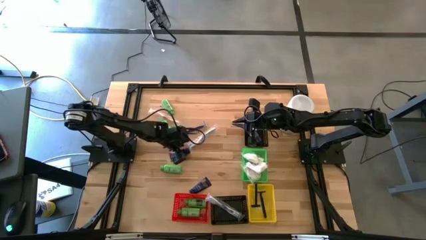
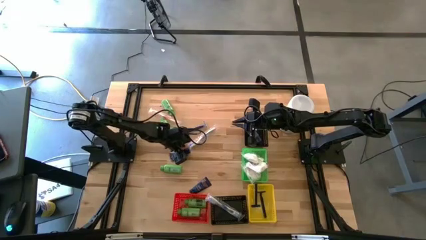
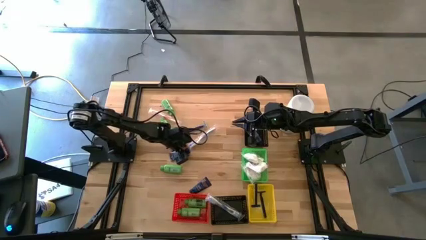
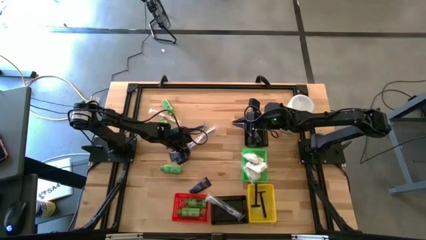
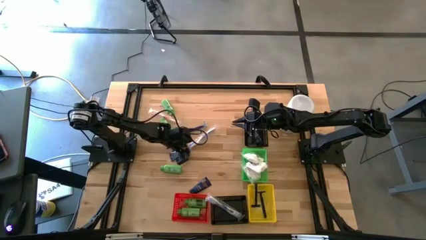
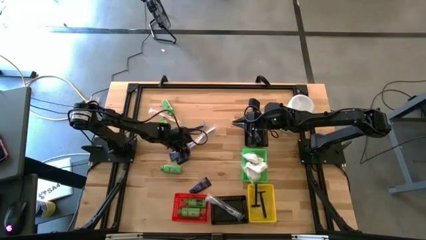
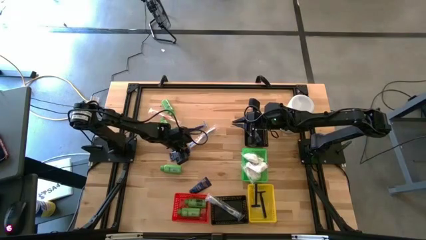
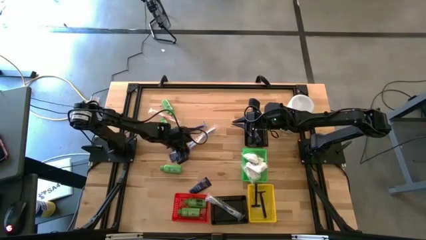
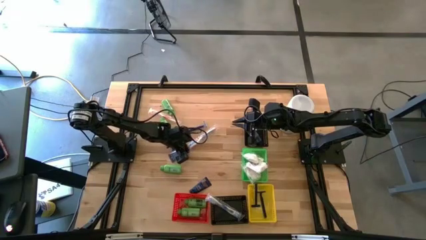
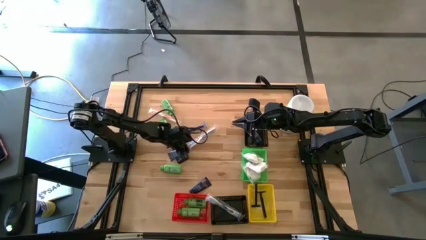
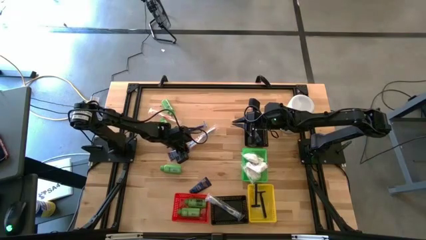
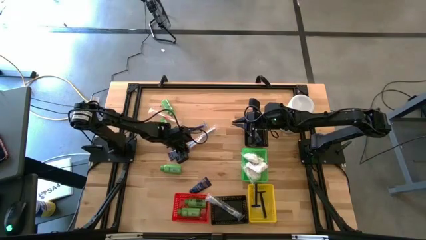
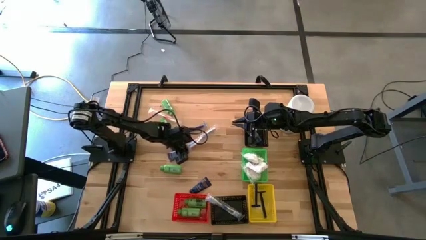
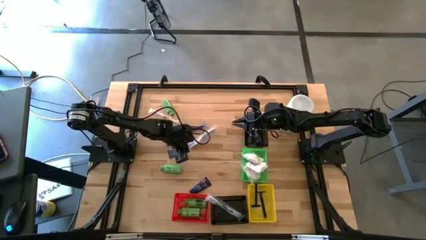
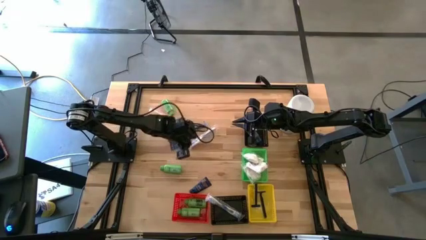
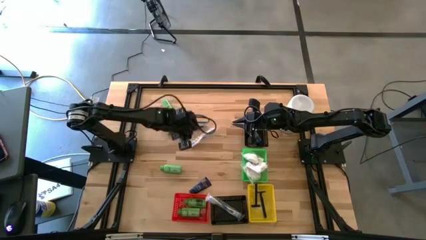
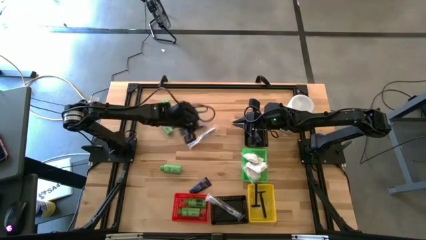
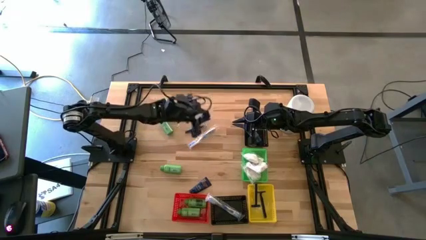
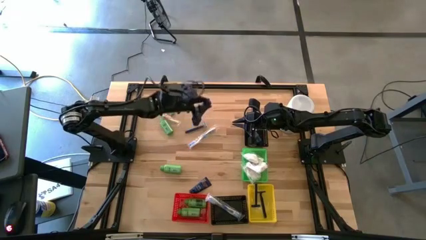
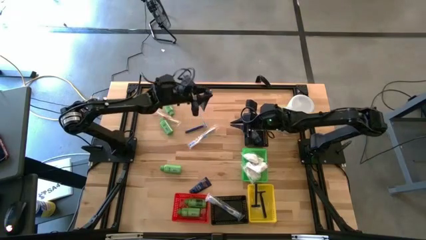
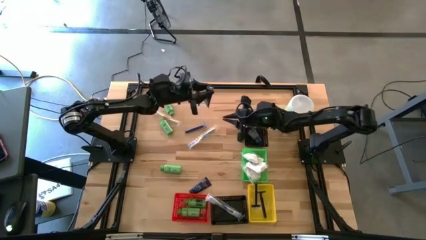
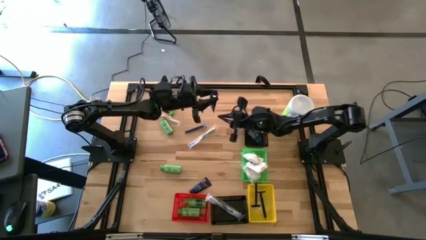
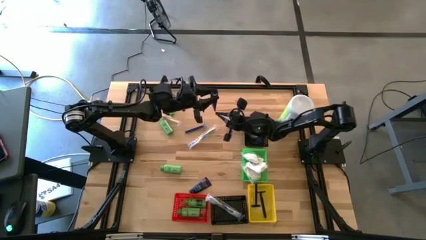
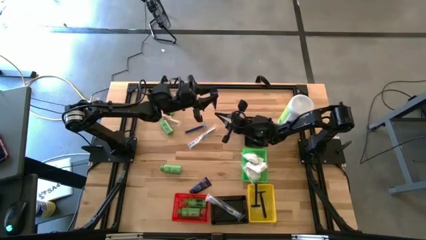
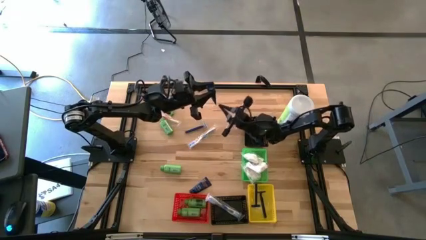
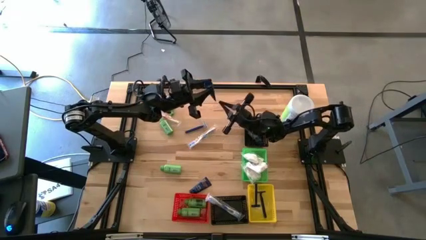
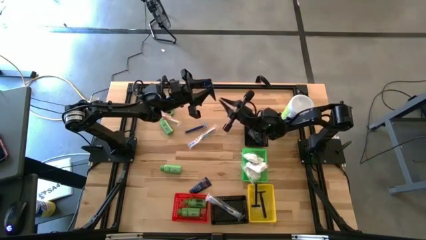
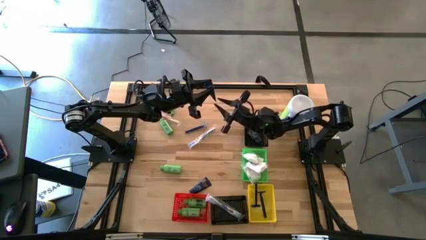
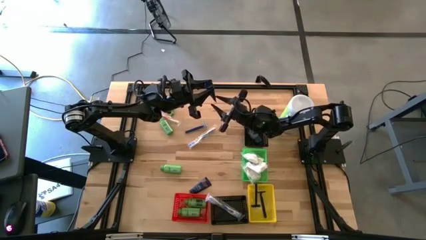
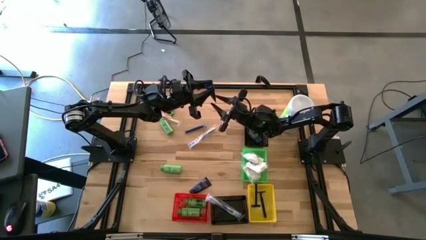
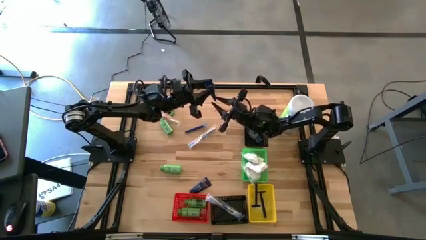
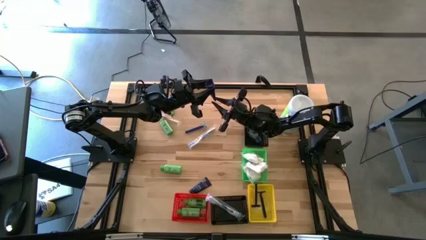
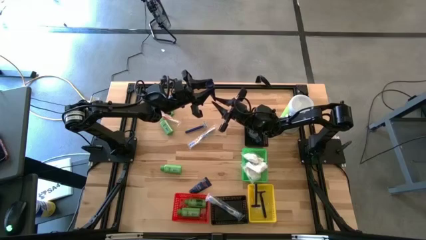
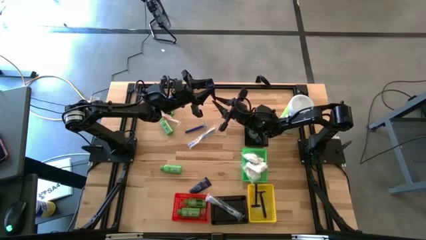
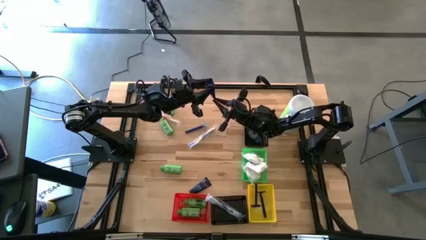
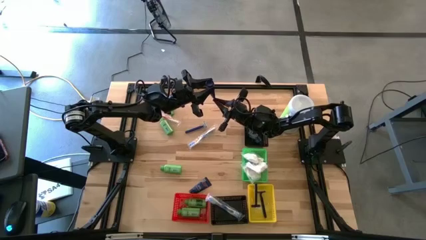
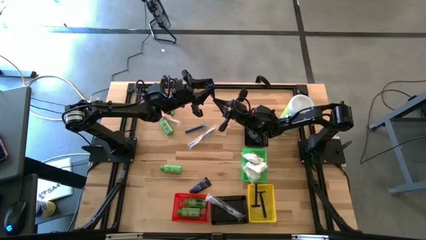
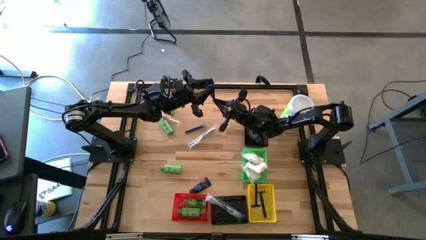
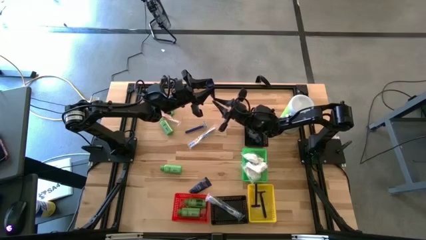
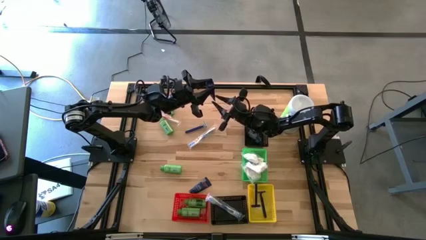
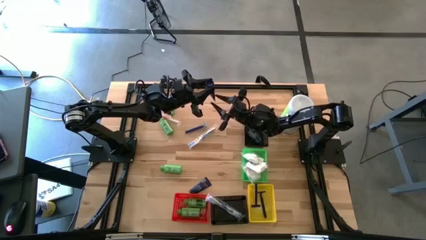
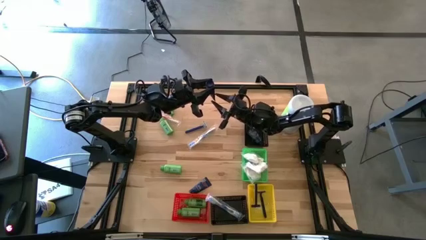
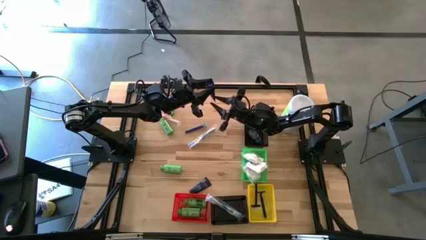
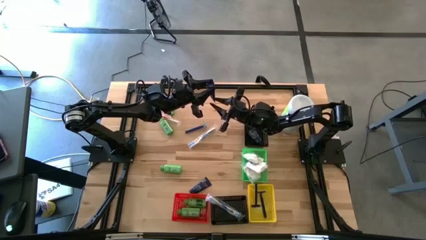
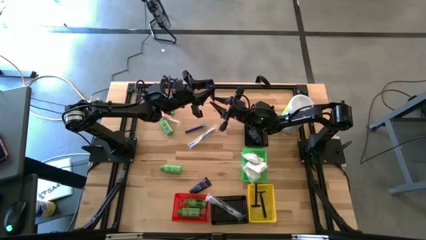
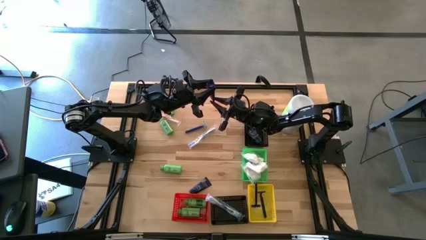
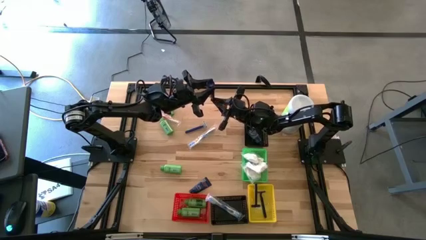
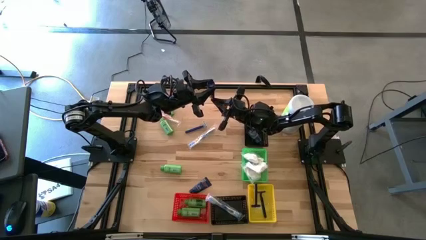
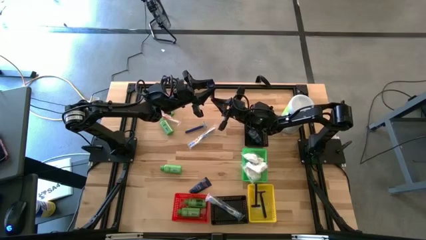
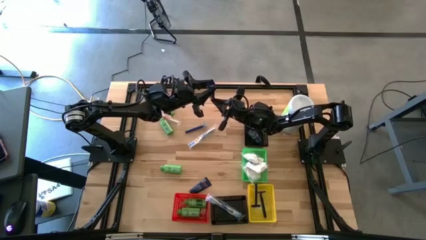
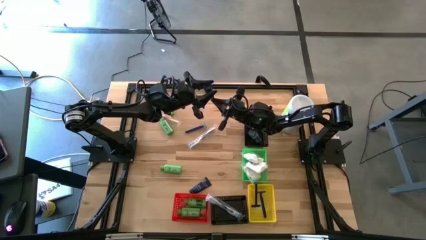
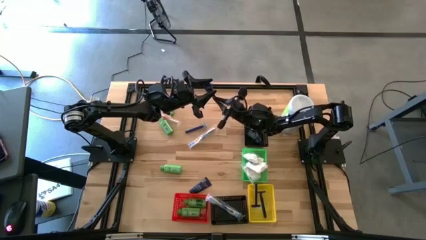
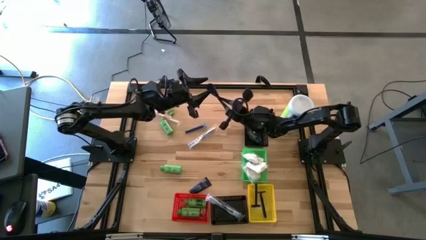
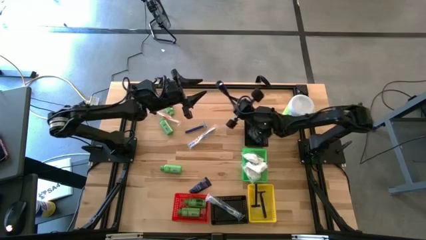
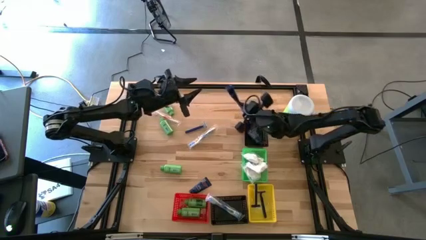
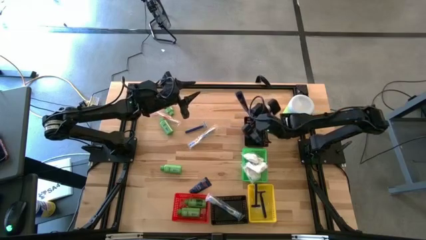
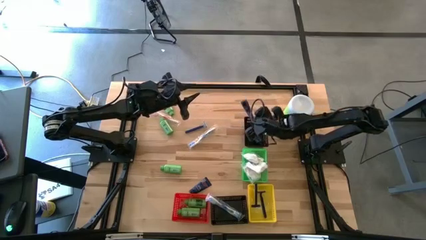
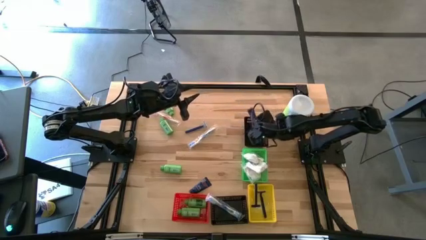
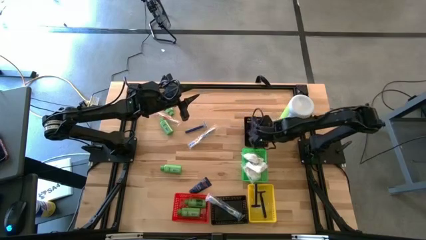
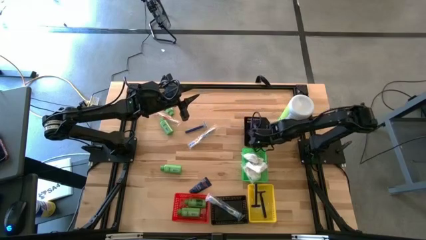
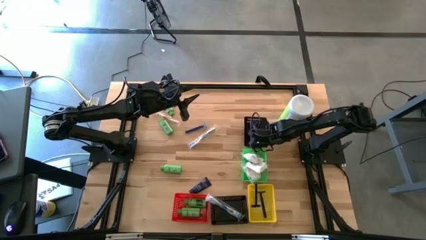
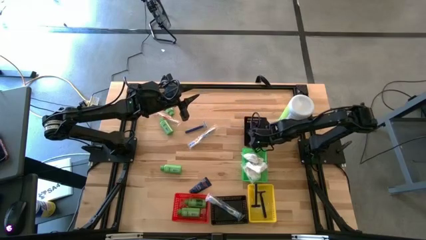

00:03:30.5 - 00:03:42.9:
Task: Pick & Place Travel size toiletries
Put the top blue shaving cream into the top black bin

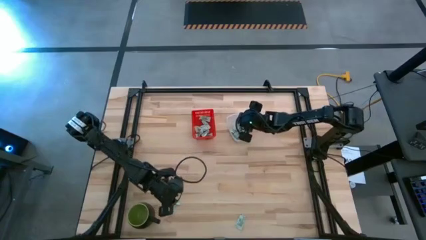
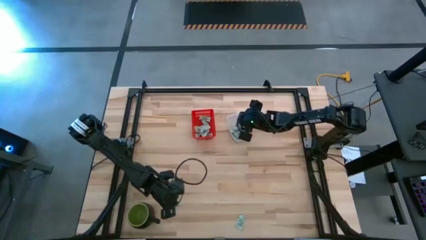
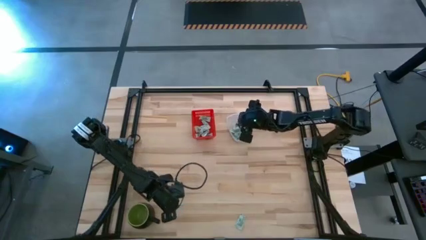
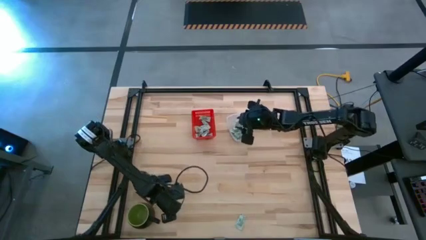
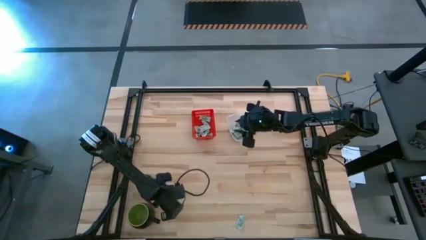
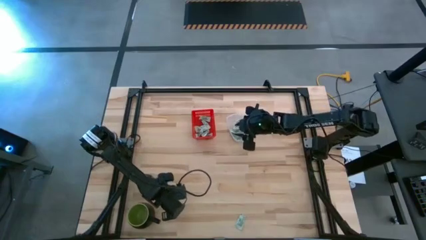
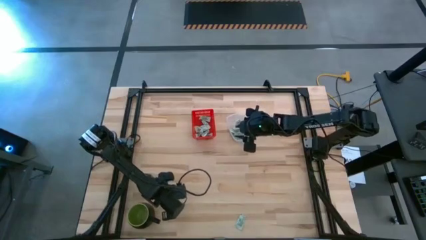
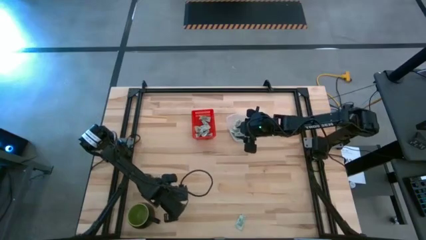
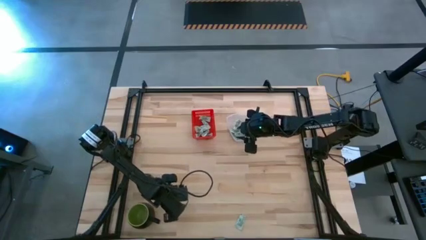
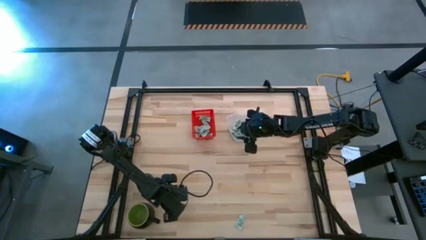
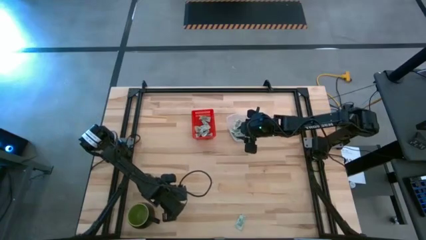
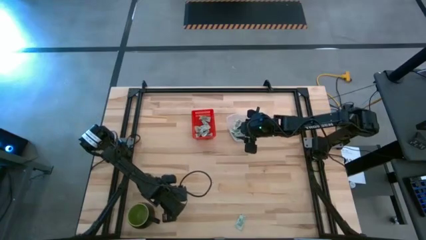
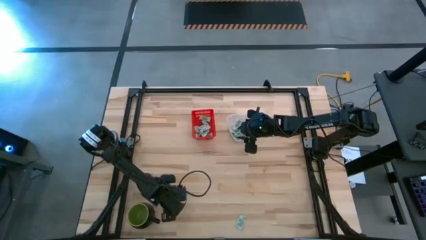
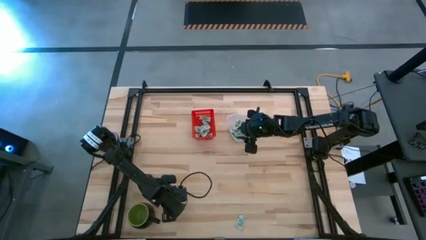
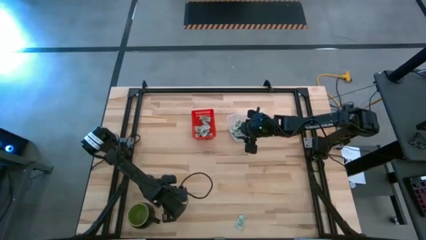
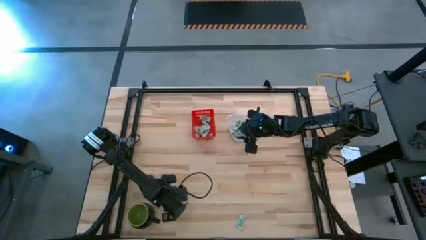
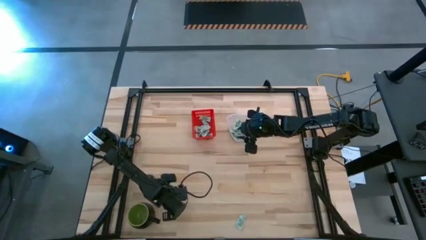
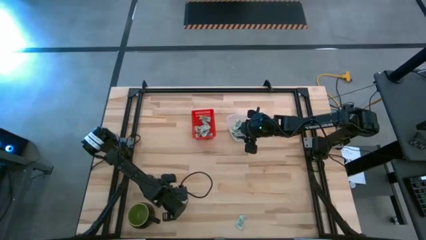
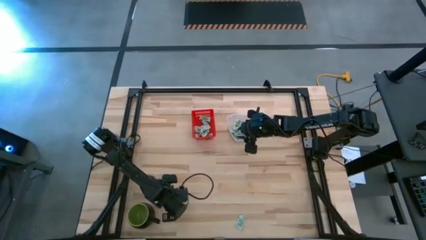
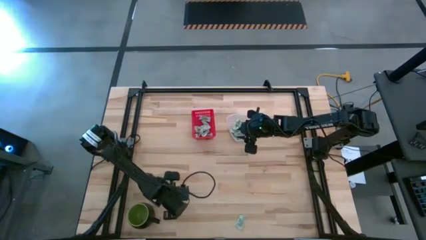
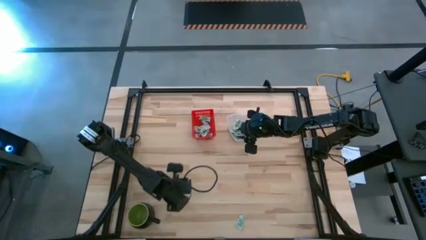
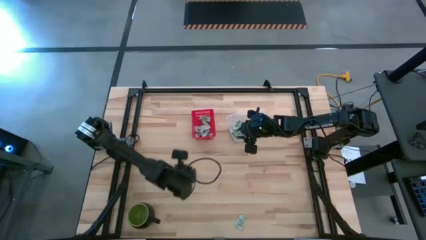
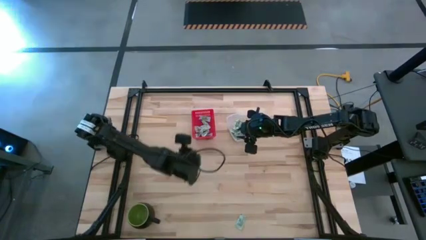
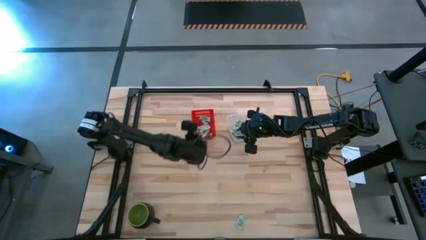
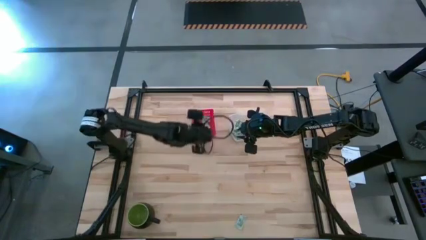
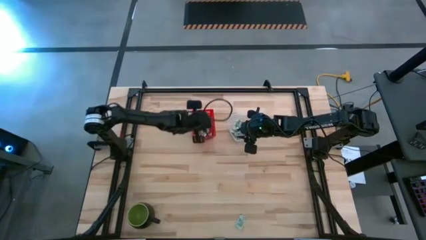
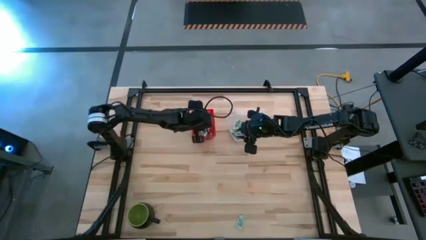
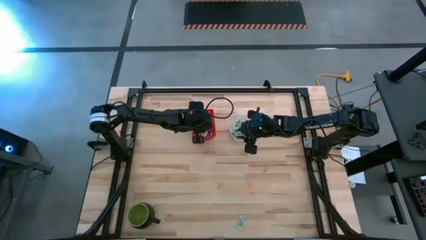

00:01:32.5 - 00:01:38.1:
Task: Pick and place items into bin
Put the white stevia packet into the red bin
